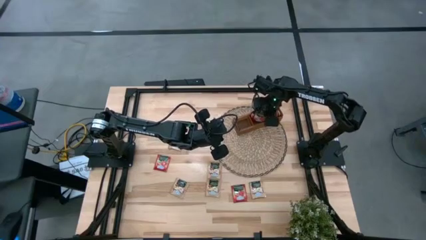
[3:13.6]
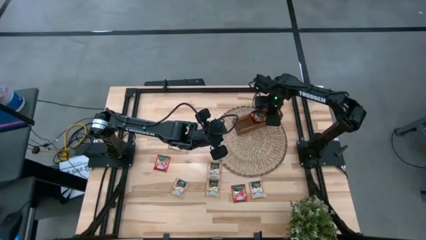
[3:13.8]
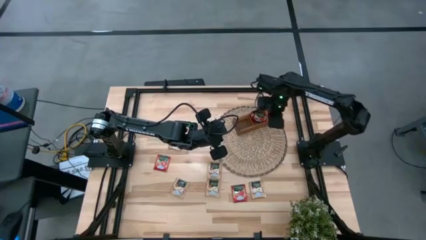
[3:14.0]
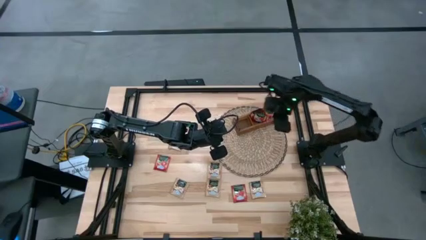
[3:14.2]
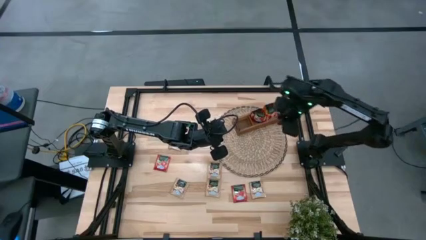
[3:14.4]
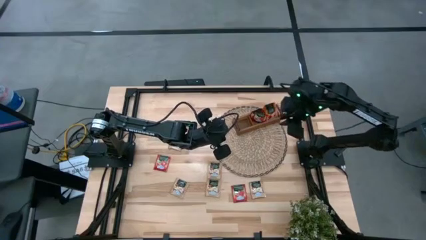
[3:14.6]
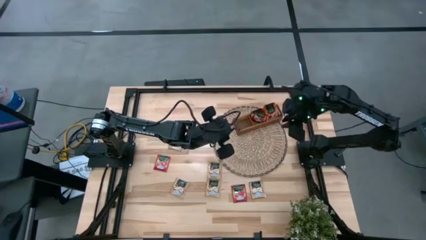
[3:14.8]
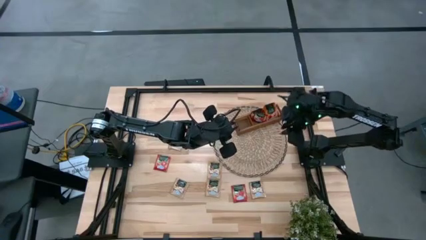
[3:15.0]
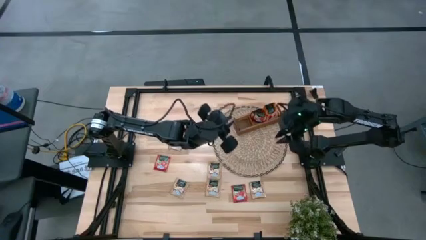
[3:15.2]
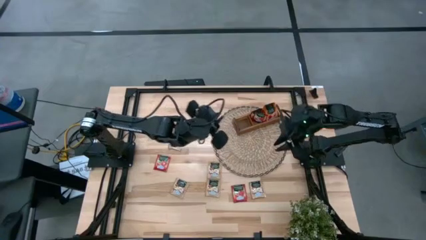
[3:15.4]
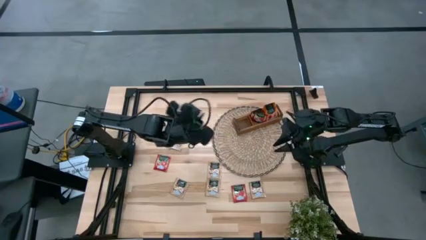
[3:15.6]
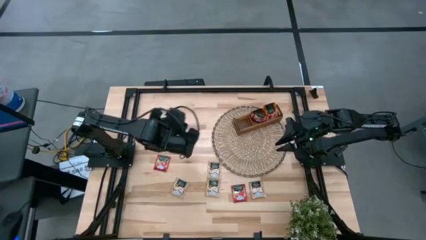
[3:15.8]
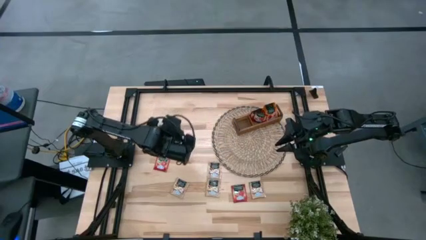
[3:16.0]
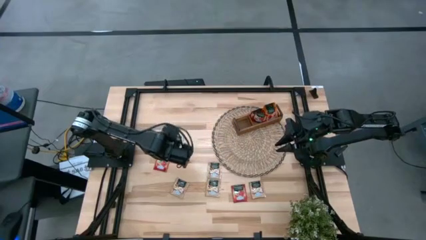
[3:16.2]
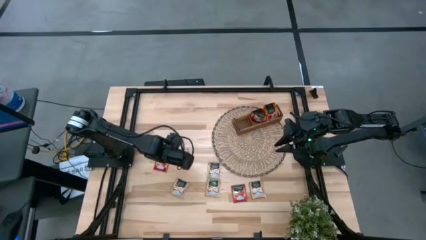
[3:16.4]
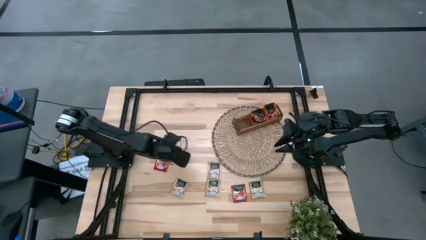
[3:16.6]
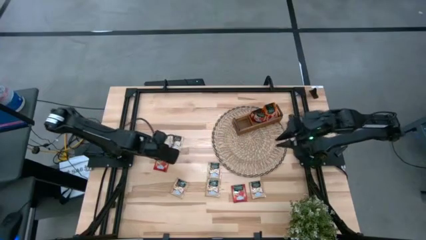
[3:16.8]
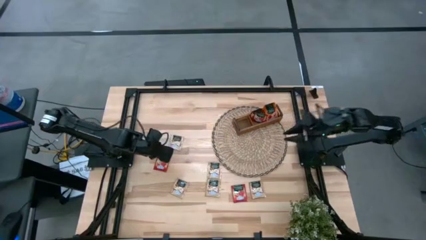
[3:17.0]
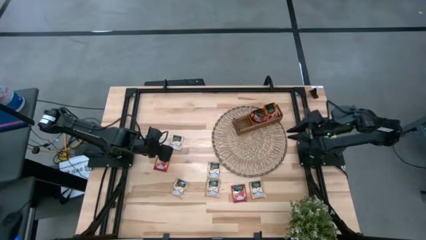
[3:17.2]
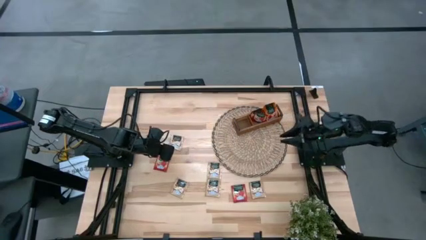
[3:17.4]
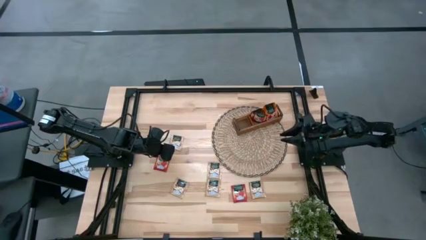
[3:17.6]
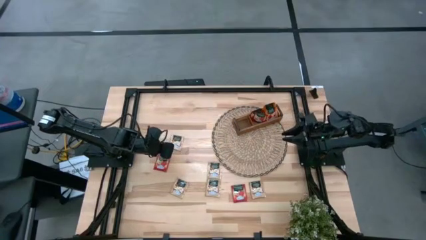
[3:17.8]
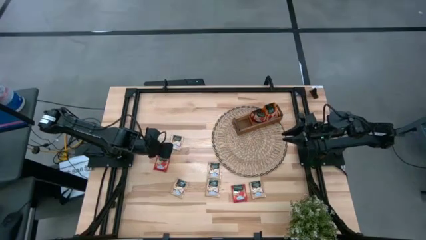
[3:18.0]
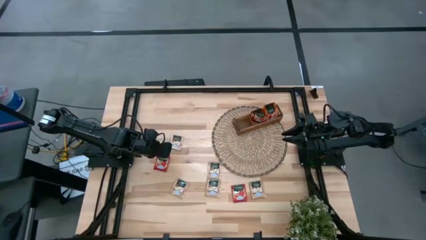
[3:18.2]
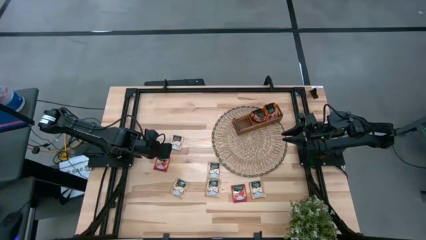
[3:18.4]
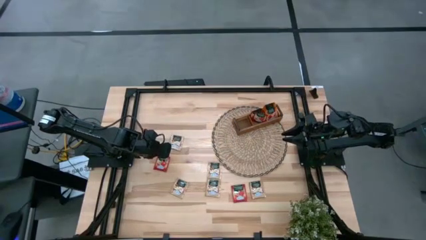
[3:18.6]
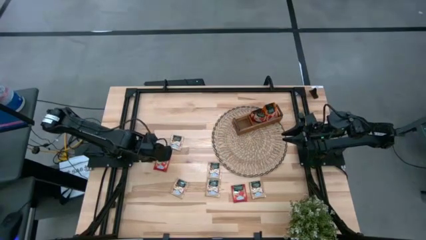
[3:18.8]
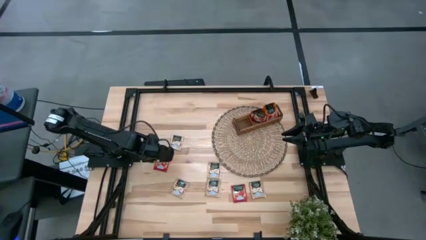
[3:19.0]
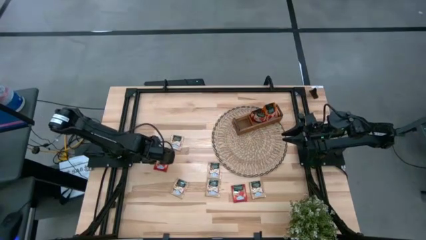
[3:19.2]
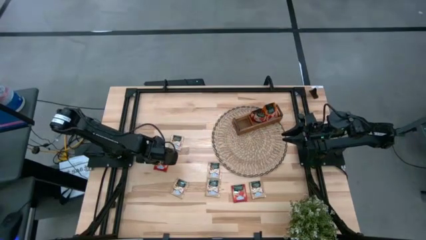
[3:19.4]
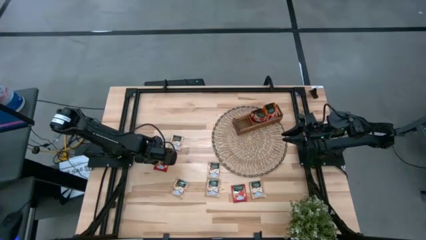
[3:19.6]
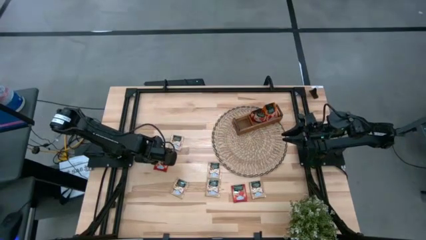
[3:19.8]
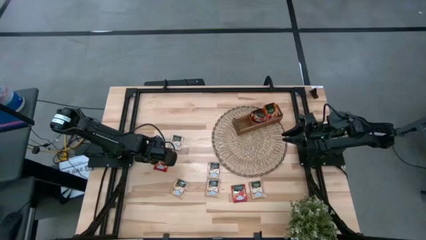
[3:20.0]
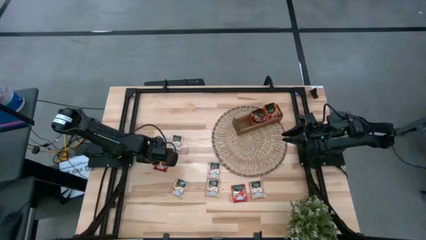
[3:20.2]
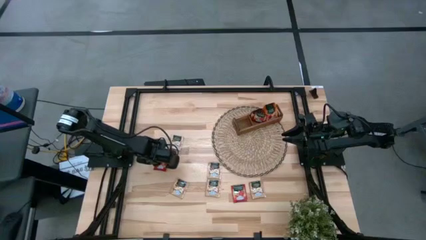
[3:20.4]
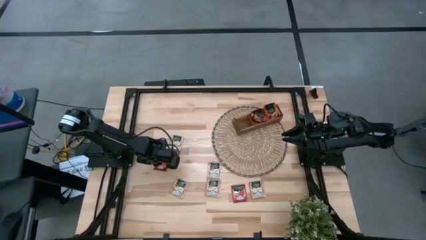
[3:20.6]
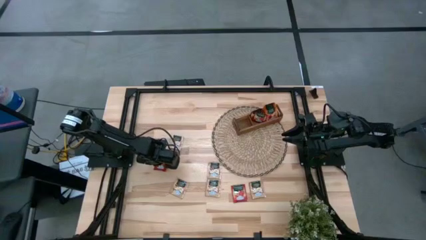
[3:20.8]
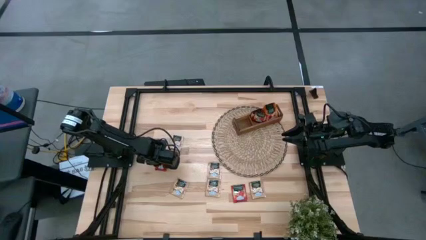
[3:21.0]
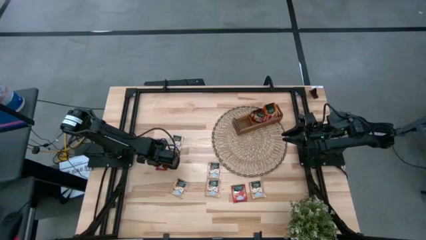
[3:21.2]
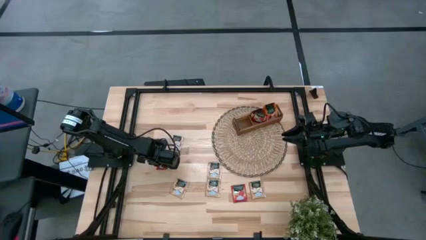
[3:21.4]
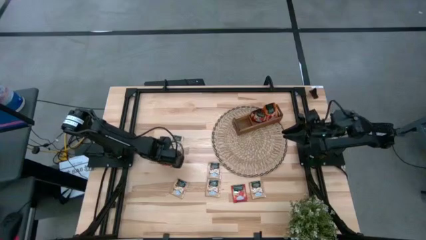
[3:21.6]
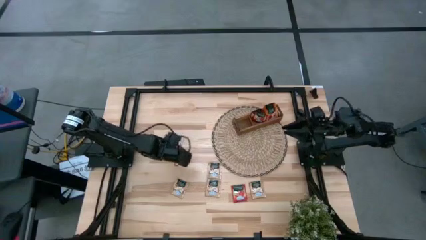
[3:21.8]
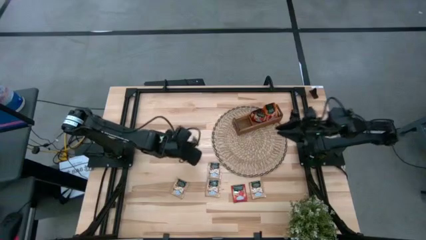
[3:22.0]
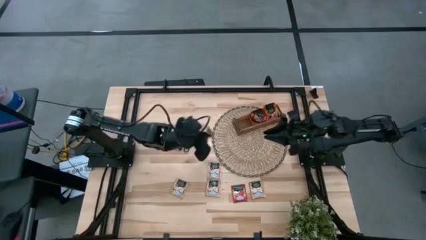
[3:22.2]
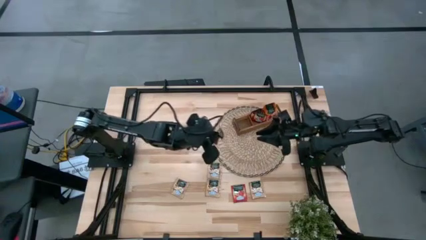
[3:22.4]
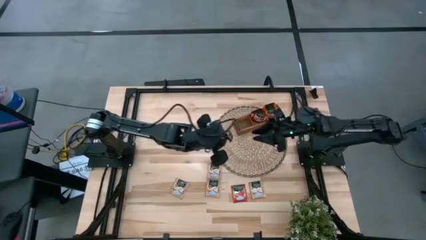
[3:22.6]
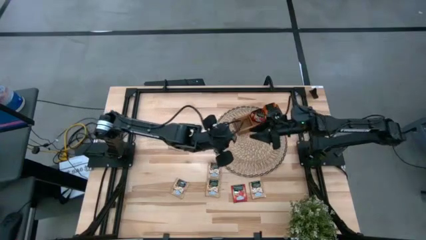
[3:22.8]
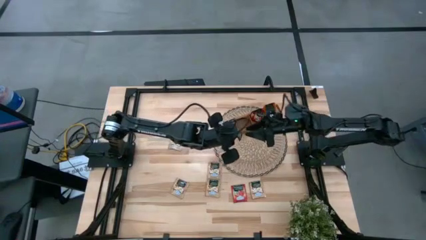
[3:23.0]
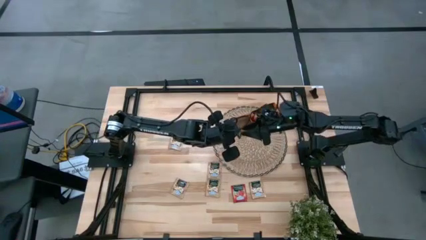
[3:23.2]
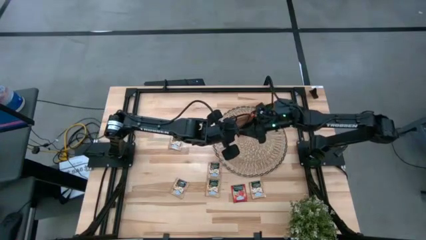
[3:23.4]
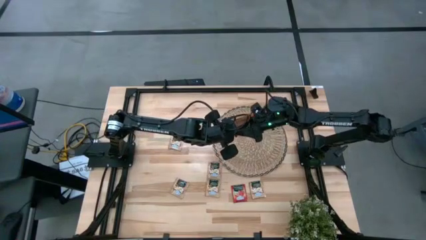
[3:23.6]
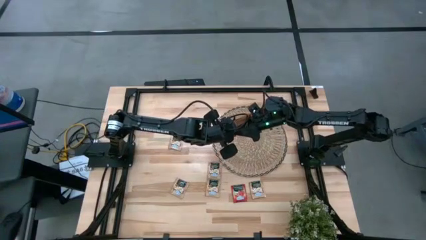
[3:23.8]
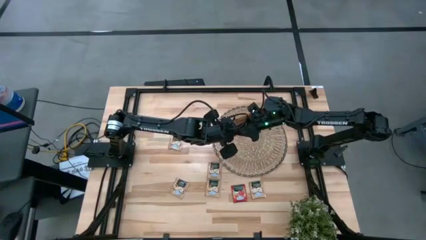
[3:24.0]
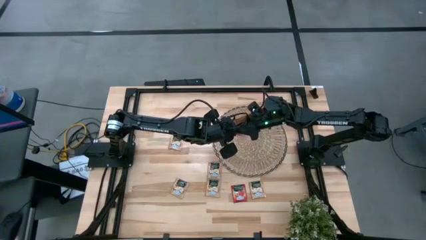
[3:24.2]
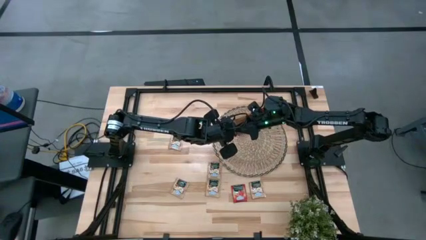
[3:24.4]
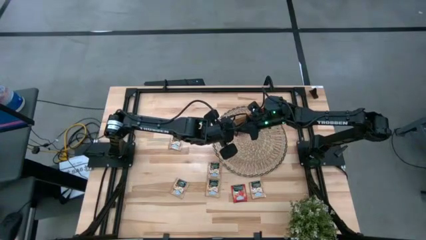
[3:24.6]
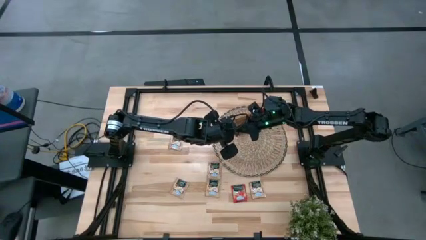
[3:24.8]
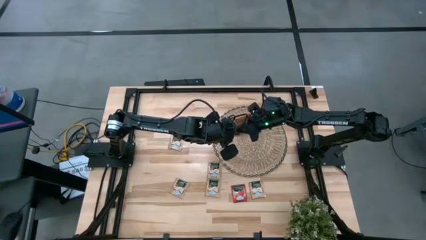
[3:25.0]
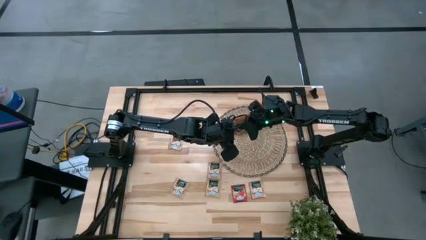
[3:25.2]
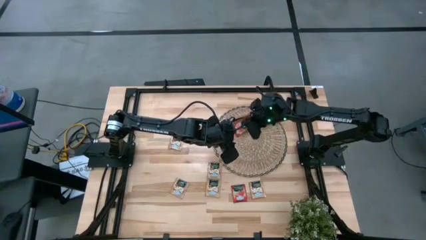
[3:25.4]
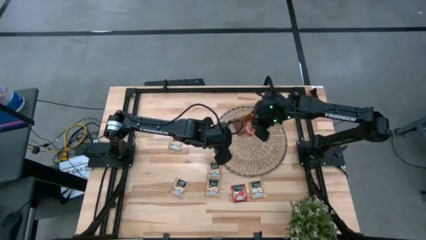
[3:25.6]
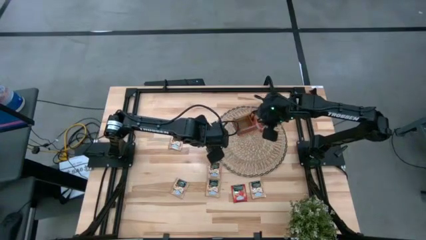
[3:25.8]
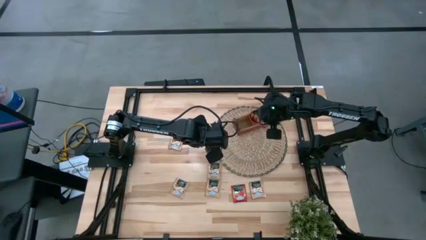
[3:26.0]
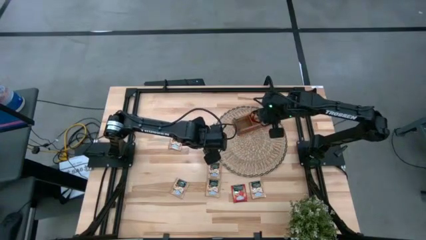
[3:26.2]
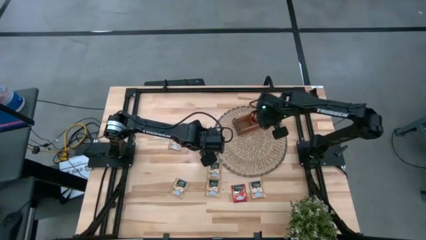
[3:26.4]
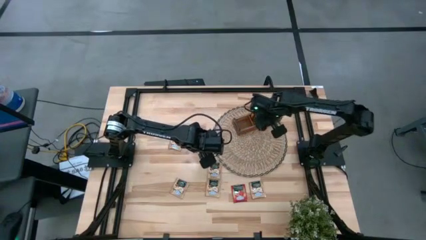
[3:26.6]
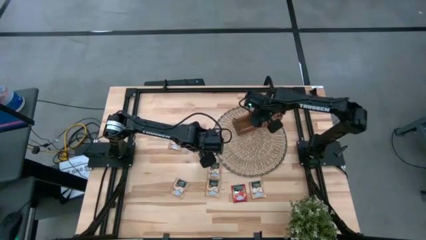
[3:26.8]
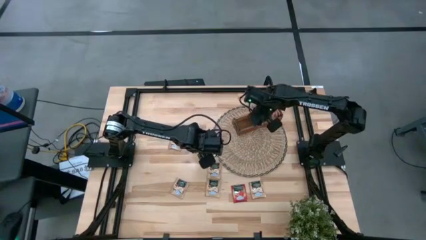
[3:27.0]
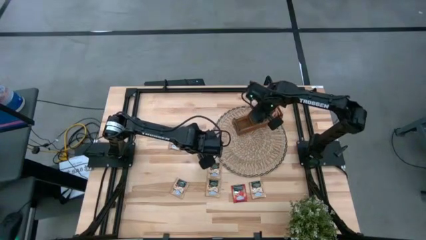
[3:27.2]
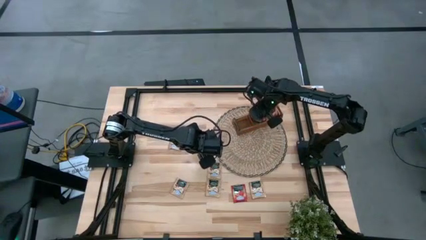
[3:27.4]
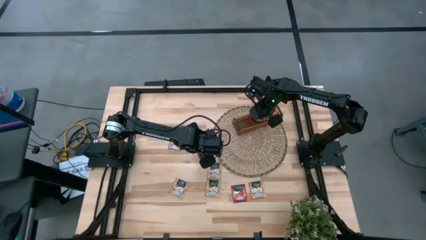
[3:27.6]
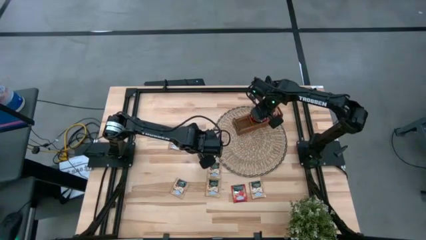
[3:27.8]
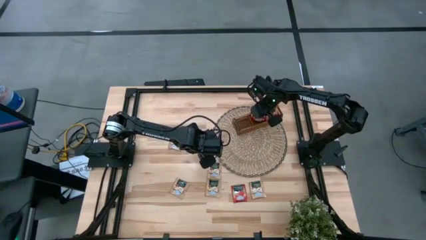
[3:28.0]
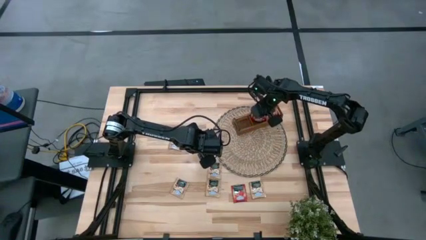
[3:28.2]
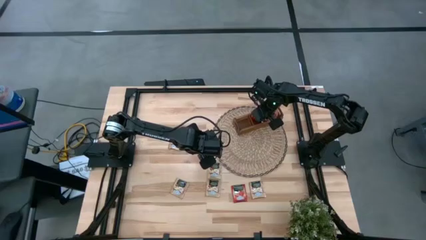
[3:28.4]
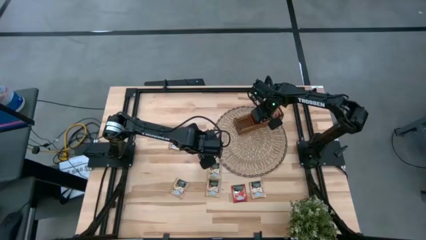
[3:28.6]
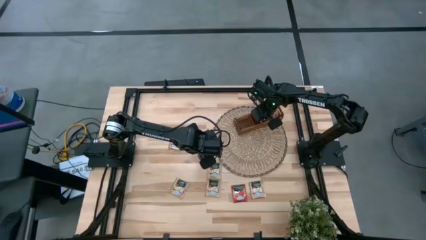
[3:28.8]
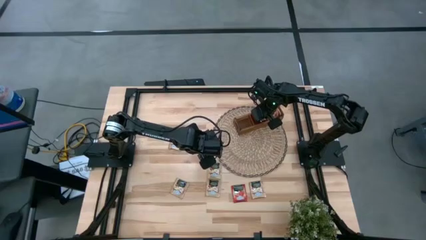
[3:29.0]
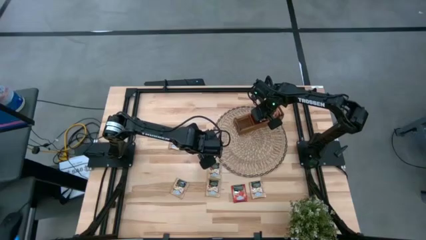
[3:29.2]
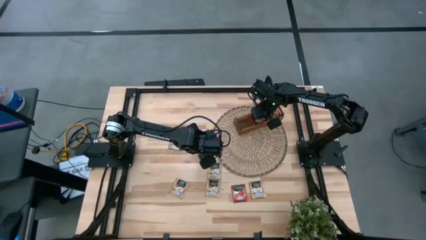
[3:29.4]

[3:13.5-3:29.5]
Task: Pick & Place Tea
Put the red tea pack into the middle compartment of the brown organizer
